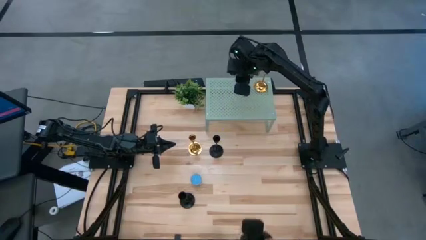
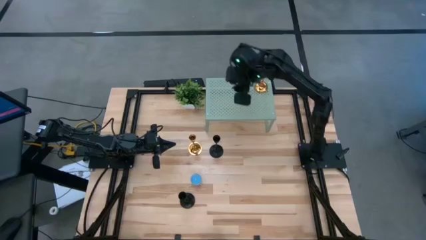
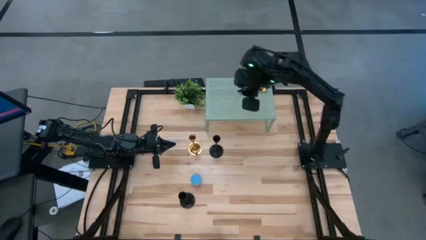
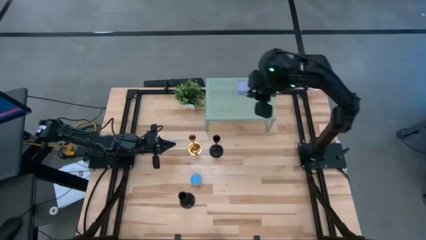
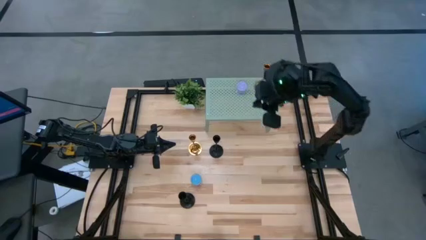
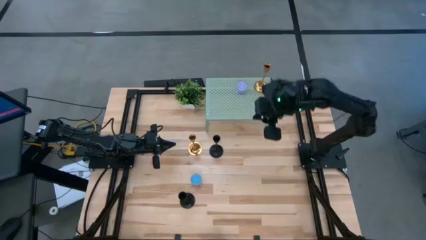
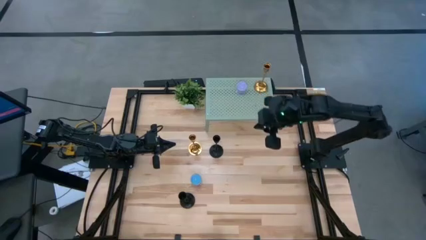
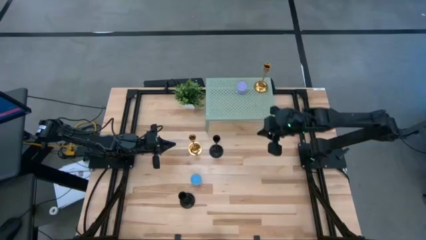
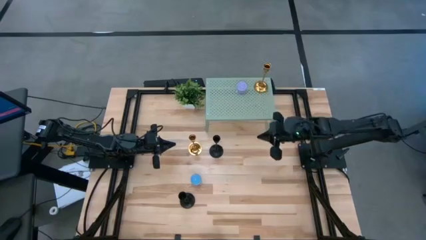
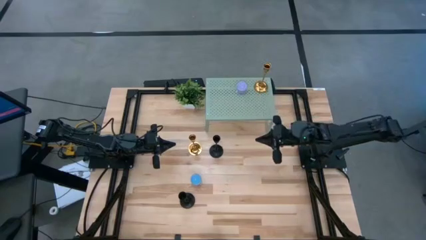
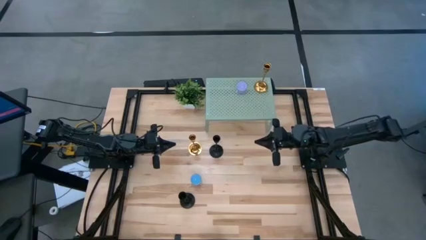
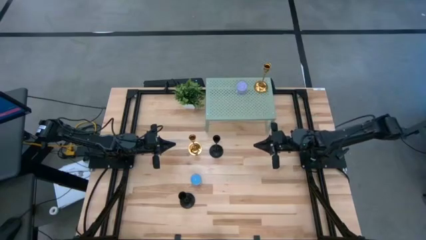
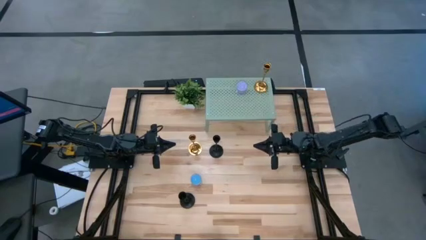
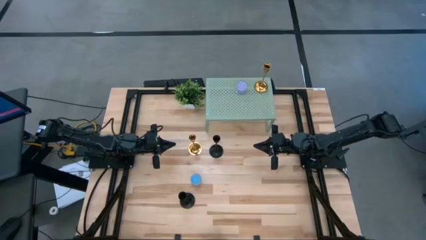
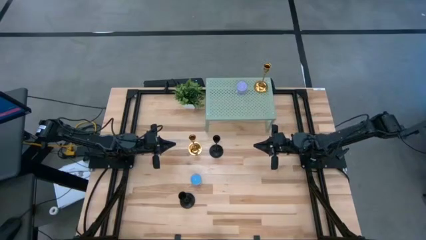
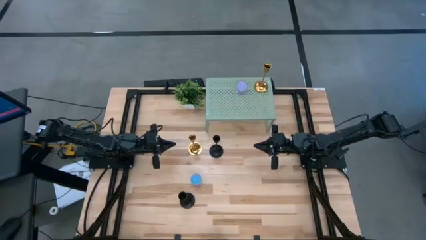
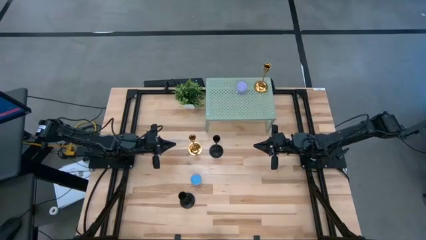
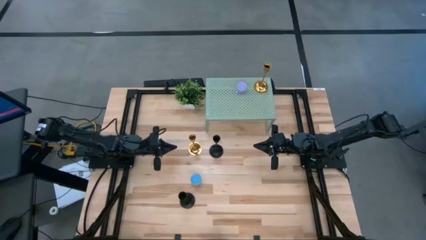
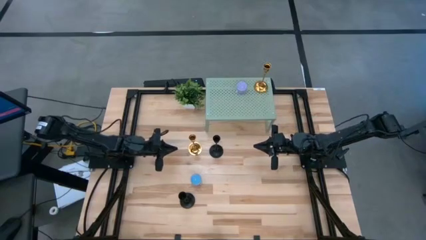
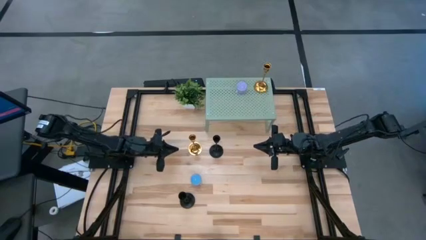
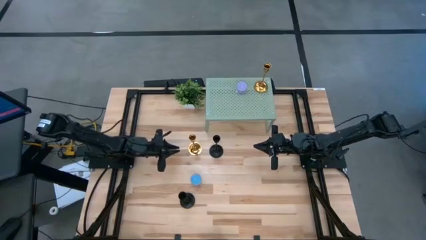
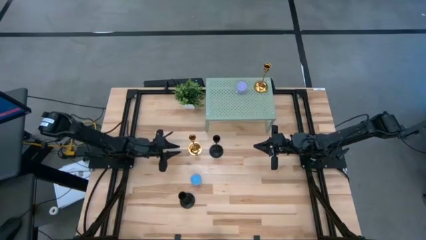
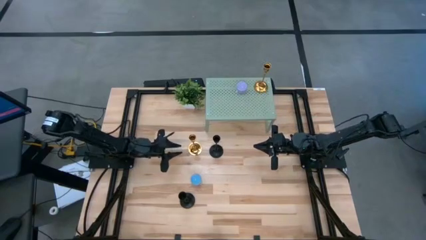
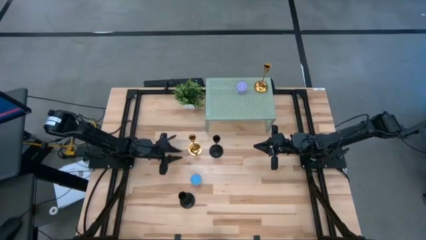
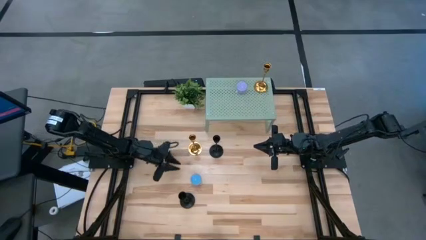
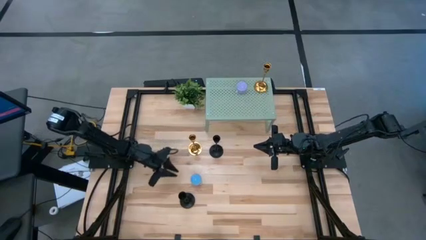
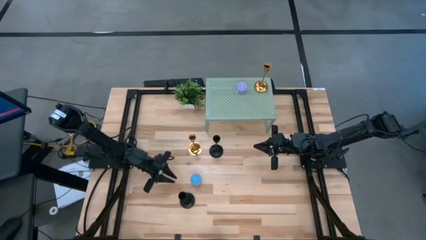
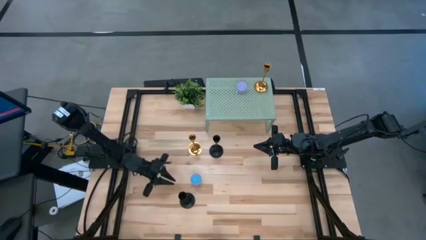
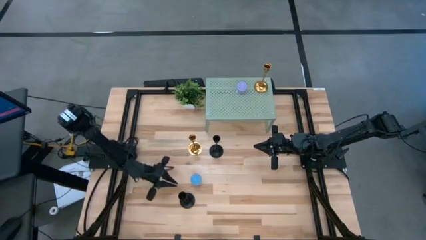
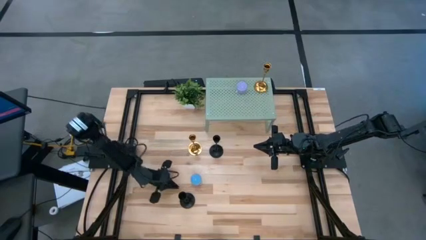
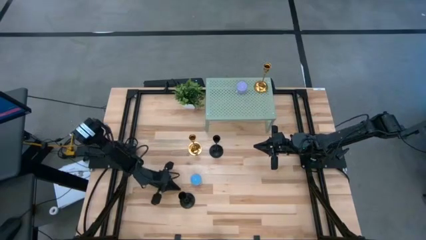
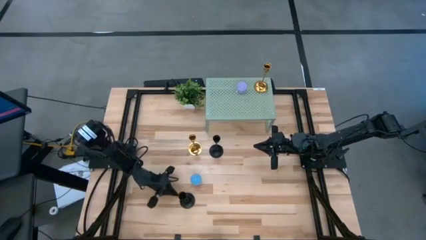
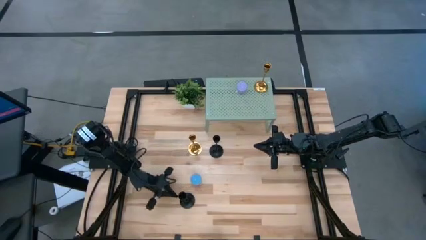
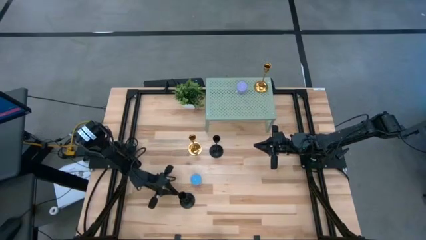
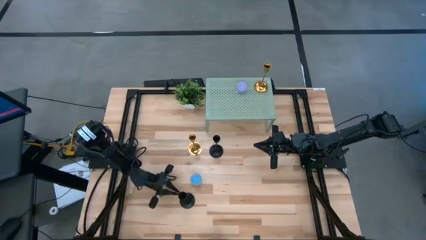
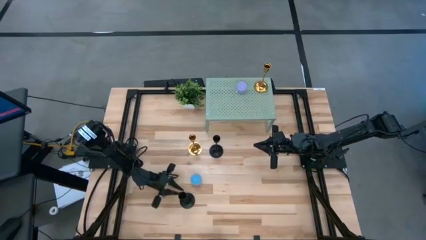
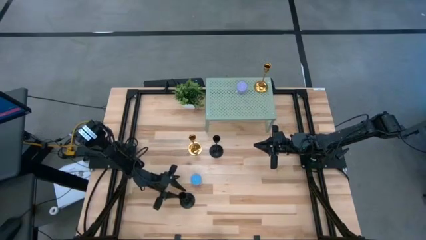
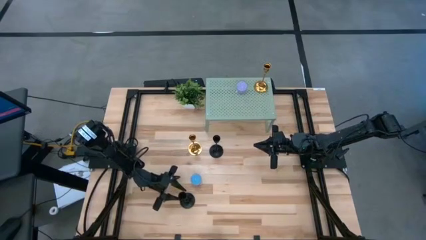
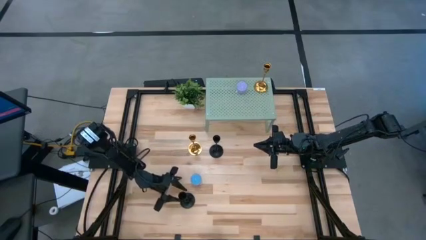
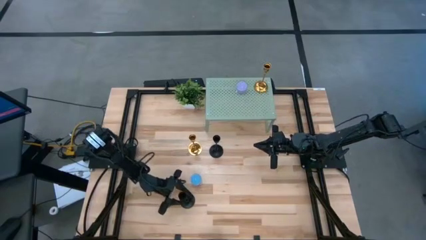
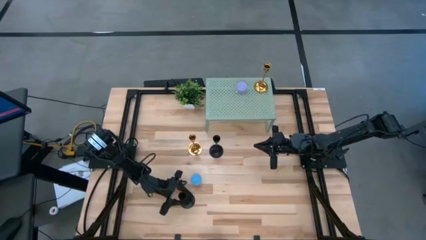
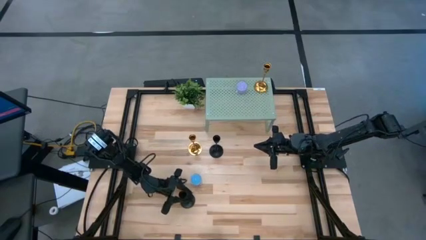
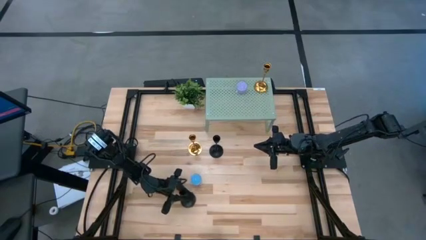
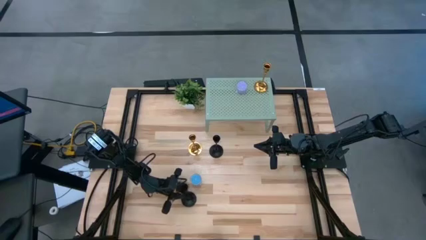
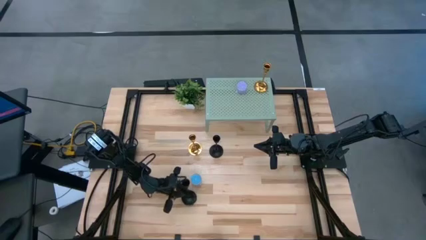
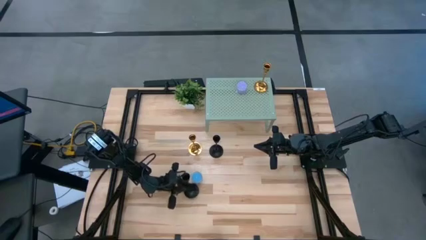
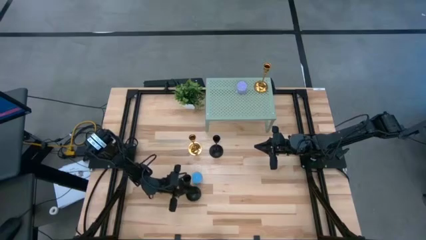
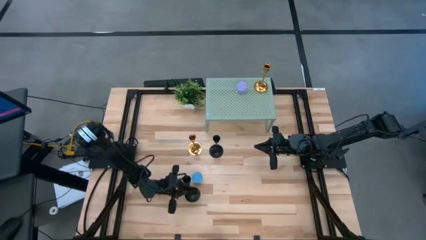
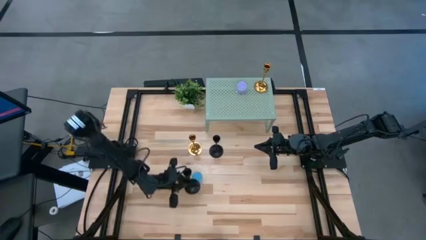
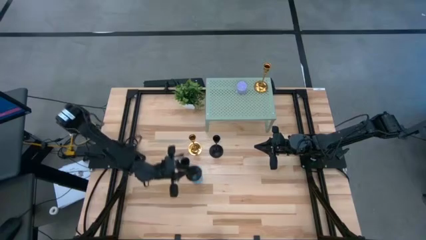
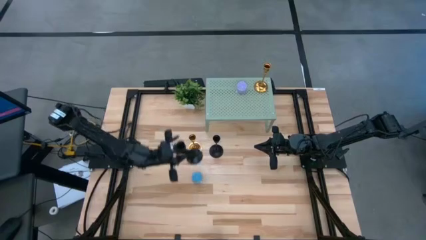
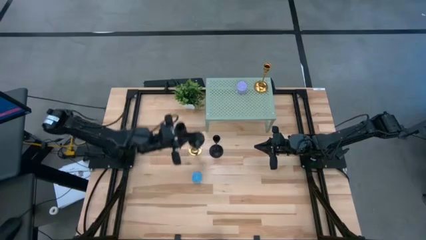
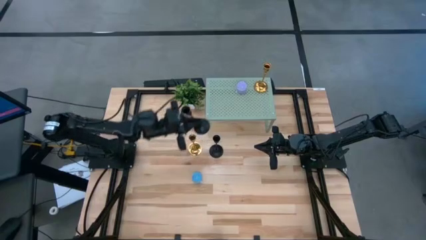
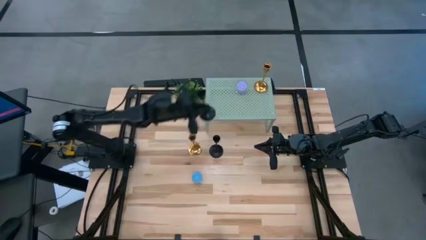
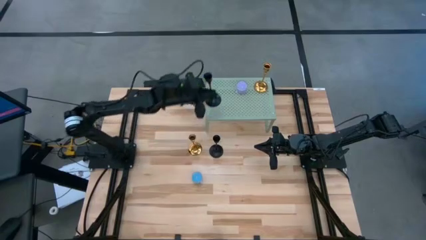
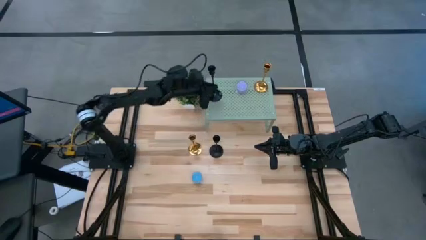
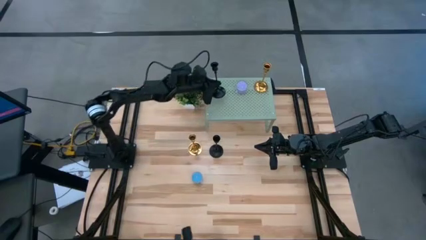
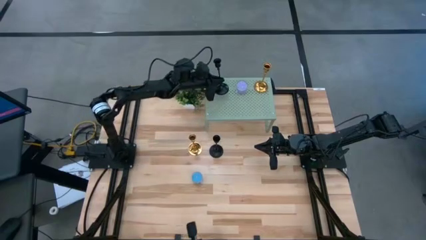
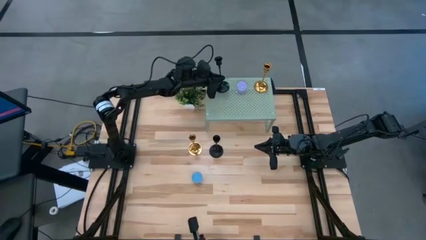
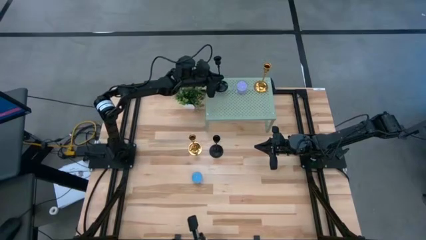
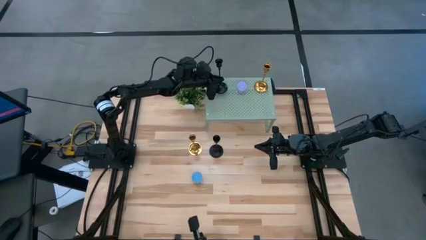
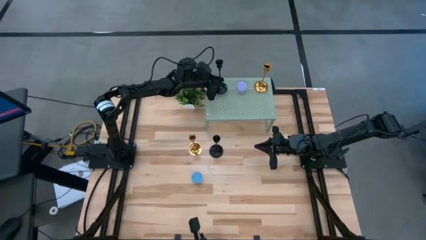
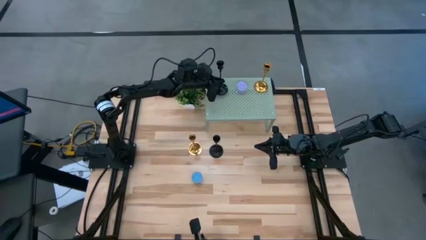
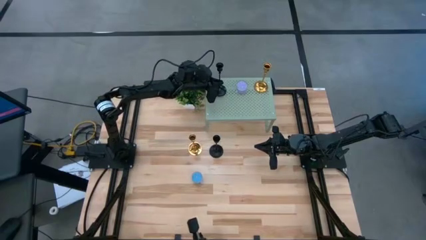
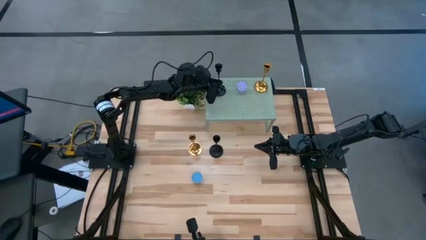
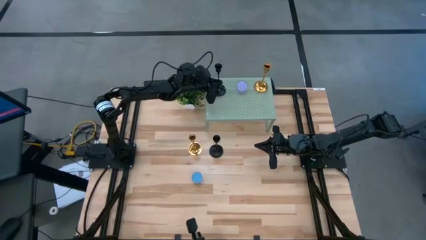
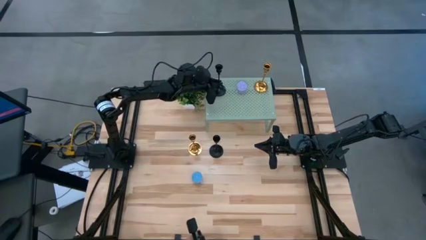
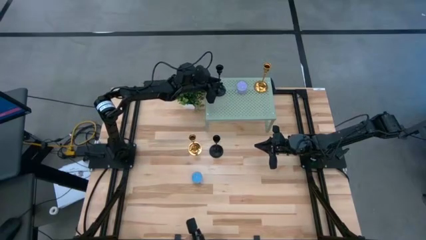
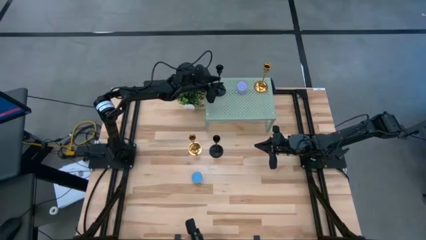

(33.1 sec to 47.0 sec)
Task: Pick & Place candle stick holders
Put the bottom black scented candle on the shelf
